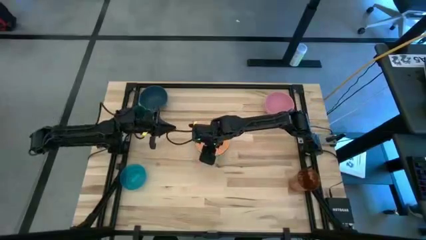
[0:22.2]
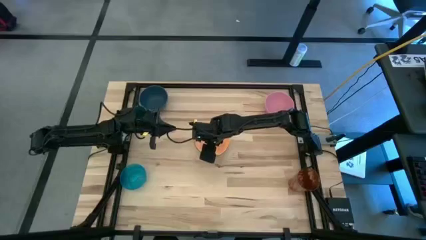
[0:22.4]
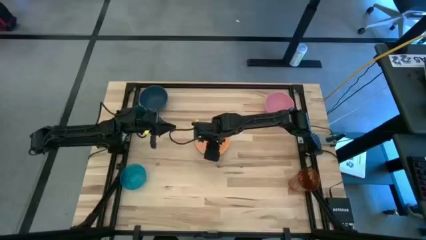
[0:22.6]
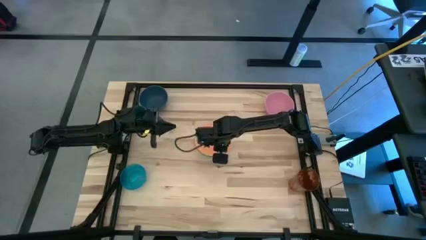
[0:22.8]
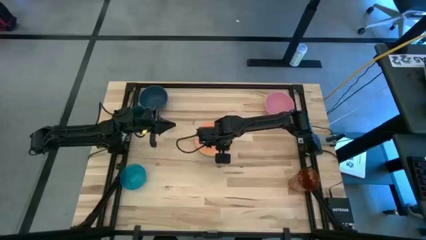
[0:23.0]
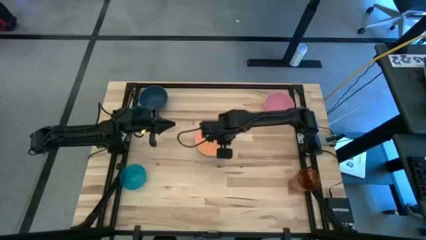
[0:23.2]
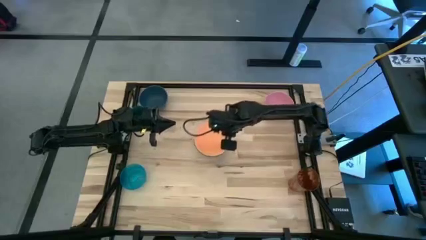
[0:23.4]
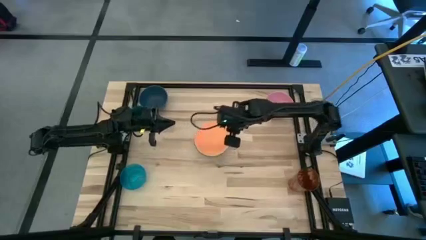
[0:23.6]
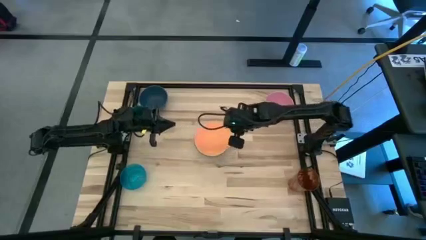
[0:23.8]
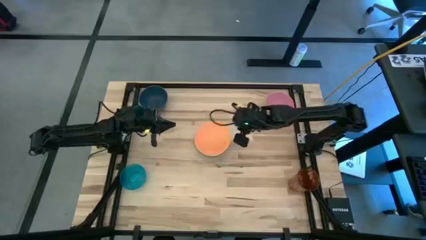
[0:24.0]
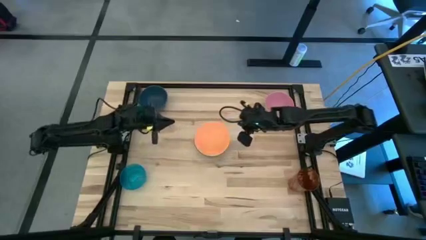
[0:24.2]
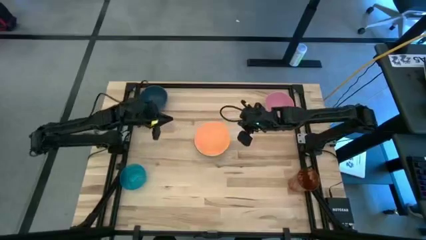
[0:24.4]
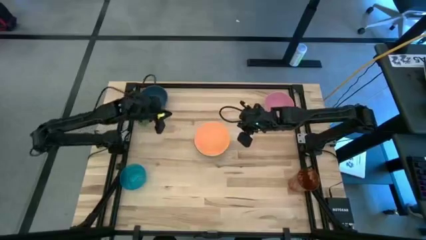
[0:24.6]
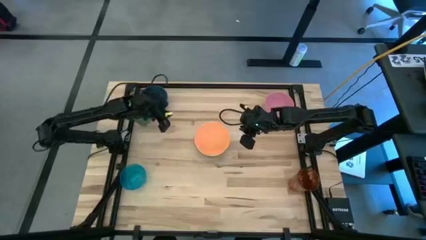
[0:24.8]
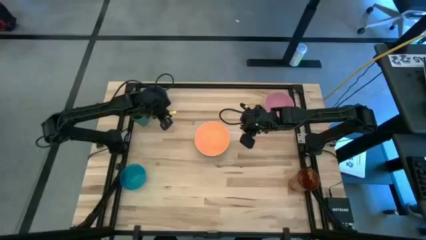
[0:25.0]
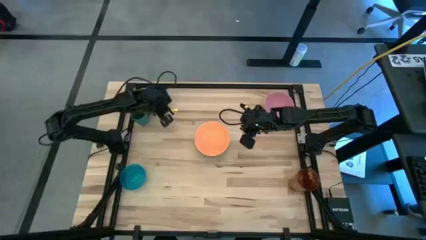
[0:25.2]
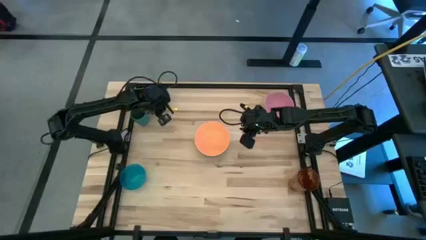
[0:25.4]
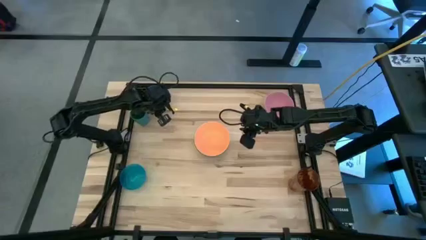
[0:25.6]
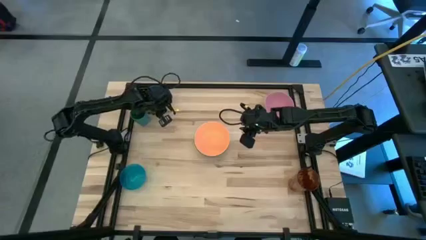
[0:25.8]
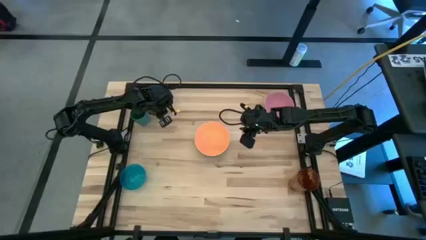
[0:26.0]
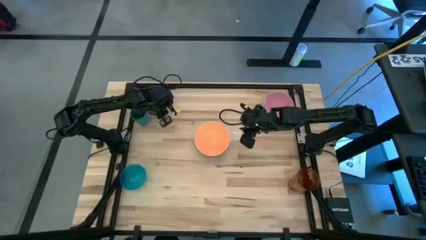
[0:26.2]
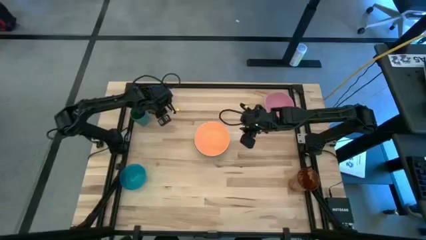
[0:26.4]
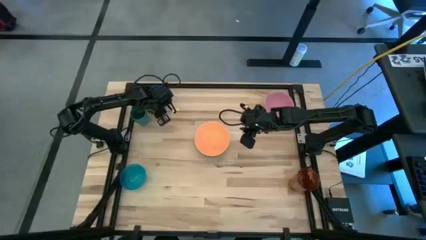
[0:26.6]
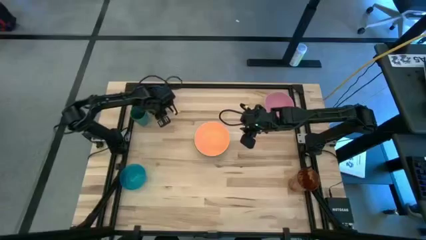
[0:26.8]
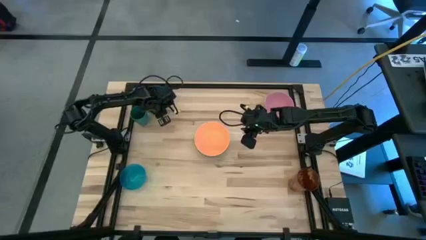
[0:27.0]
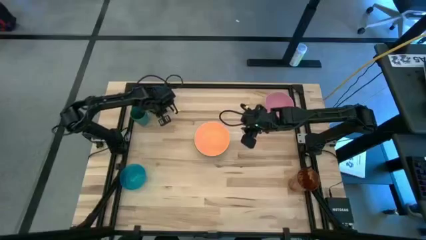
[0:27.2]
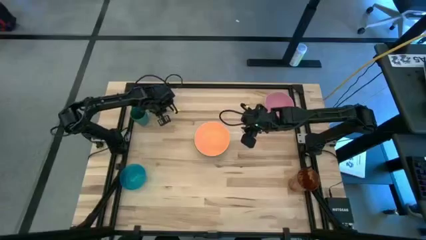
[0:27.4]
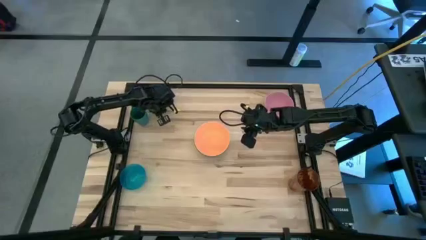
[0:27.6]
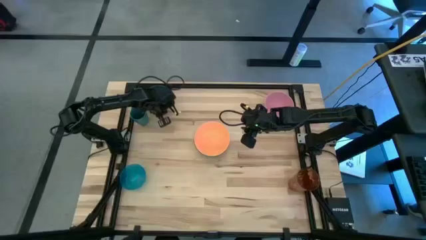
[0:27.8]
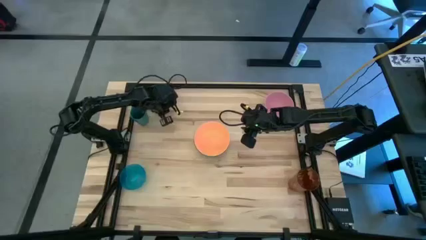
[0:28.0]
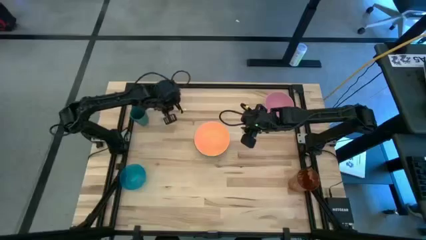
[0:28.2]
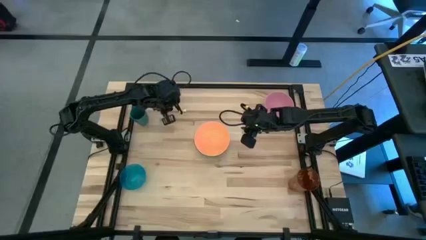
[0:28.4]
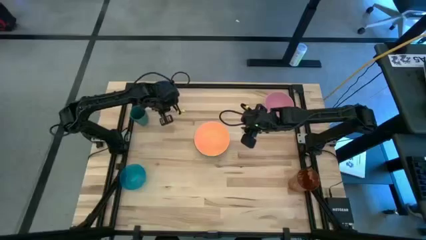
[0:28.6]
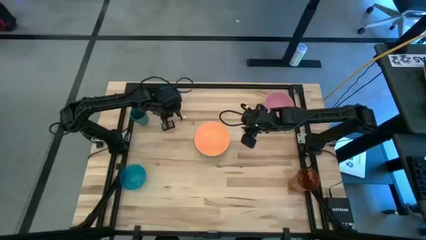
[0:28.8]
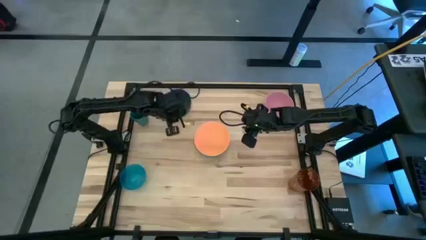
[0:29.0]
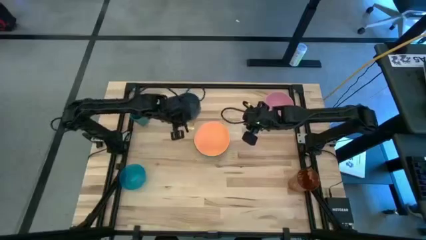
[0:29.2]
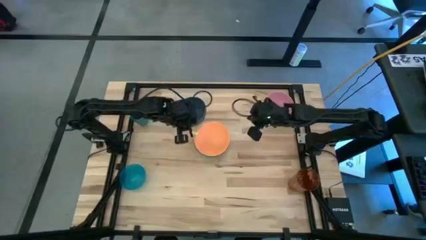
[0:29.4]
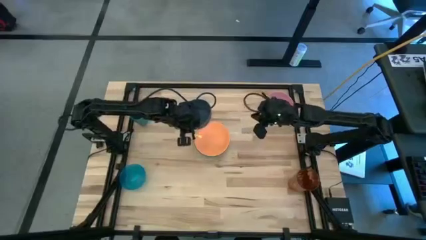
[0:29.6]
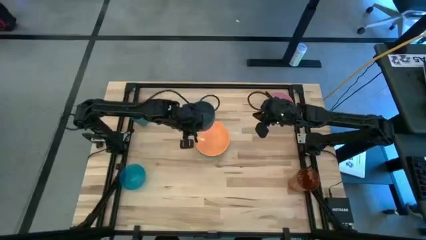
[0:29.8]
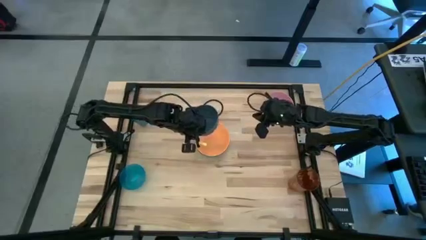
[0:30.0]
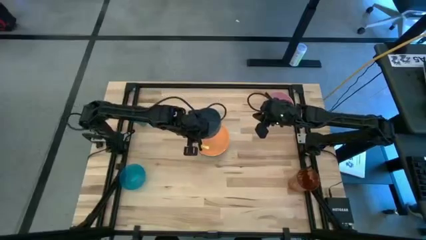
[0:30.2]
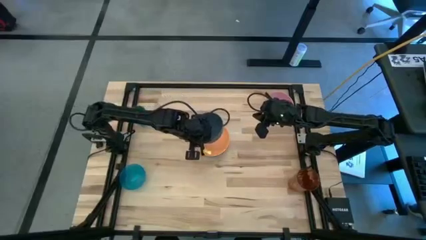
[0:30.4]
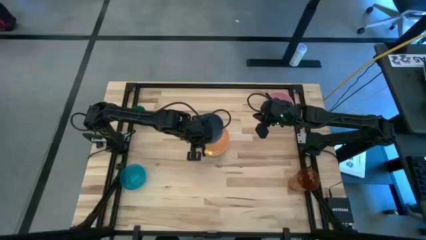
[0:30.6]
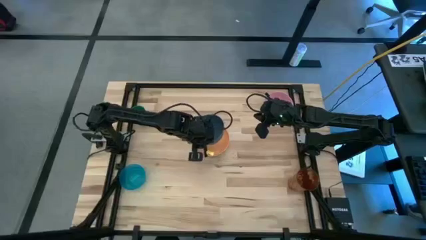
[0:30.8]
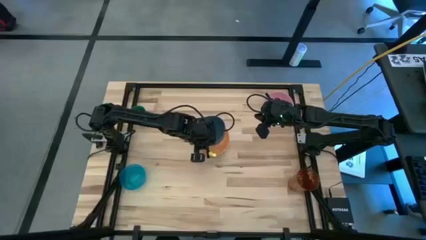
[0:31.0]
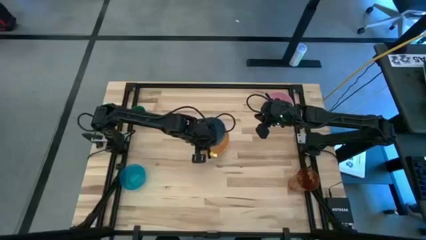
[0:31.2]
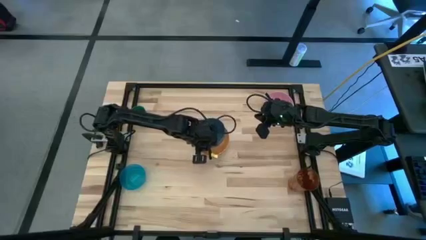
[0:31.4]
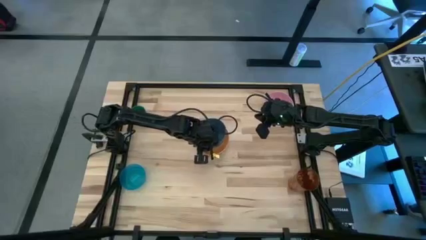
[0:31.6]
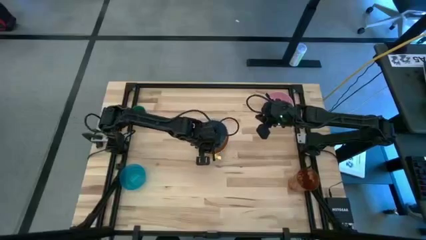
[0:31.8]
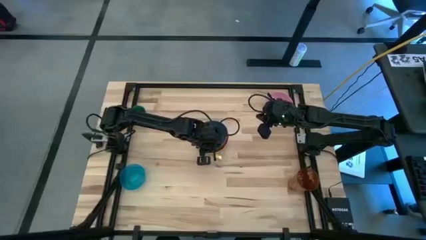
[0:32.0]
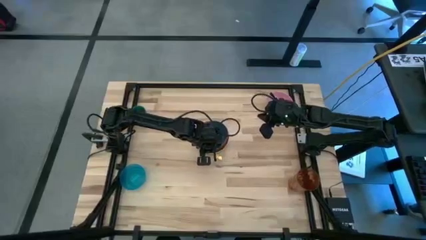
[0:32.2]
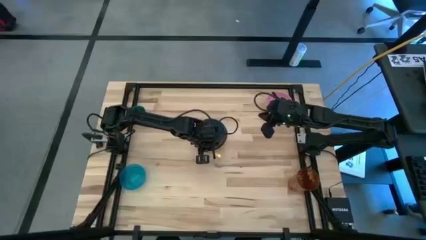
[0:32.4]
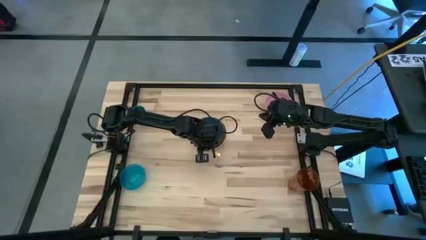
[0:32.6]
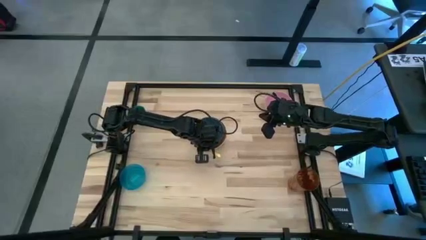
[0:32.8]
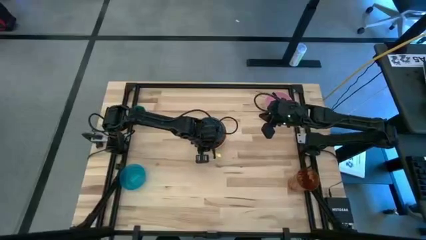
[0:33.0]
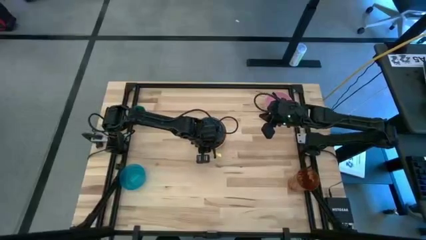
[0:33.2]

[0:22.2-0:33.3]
Stack the blue bowl on top of the orange bowl
